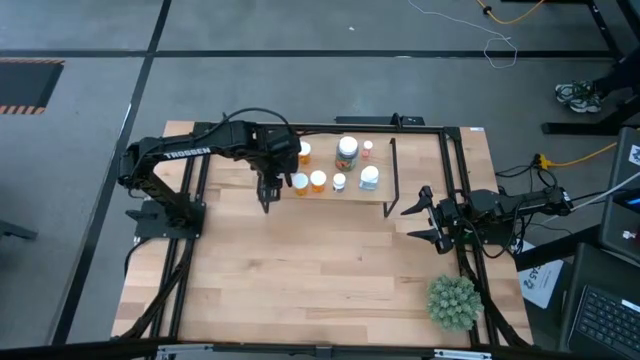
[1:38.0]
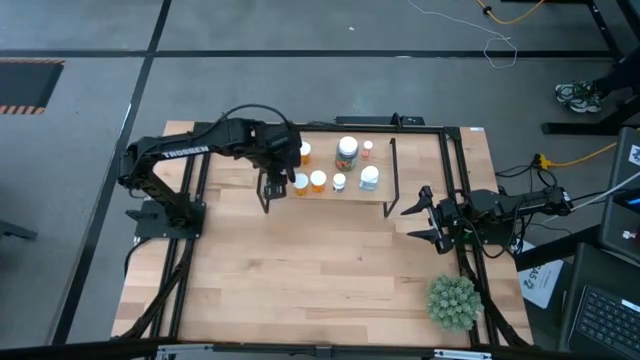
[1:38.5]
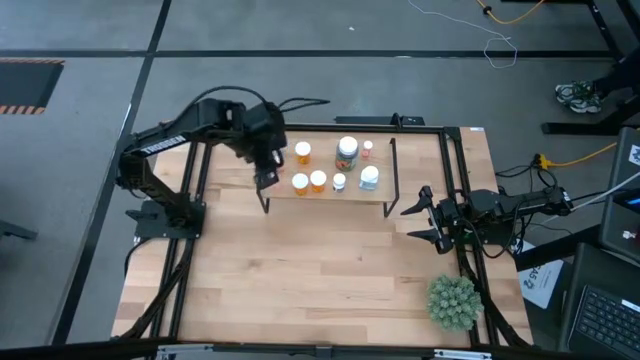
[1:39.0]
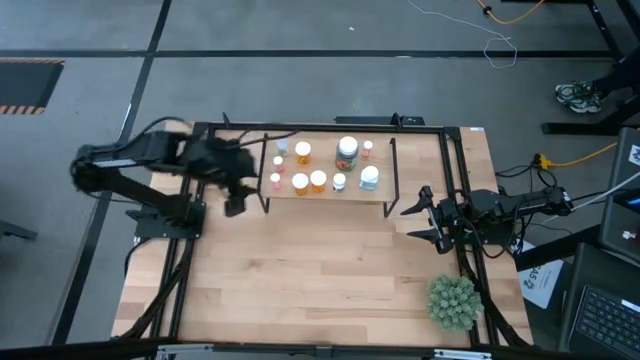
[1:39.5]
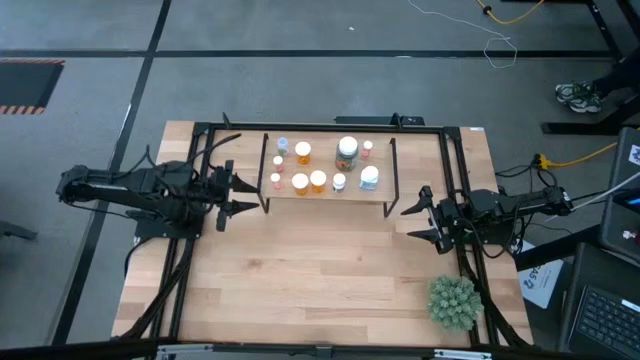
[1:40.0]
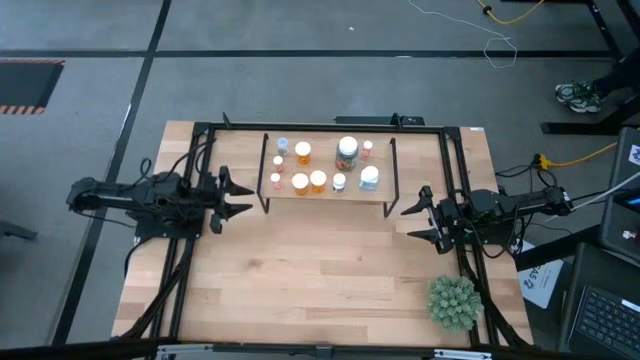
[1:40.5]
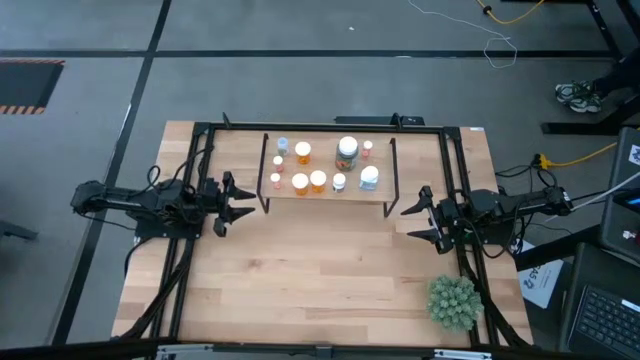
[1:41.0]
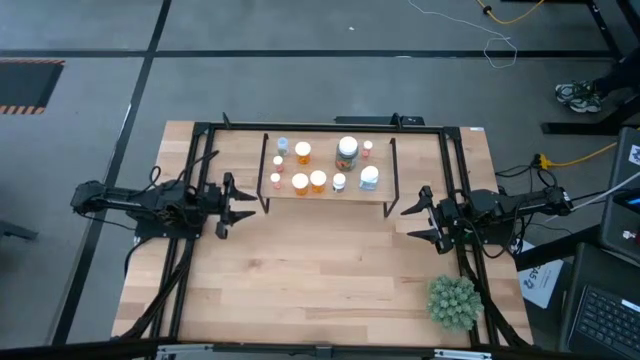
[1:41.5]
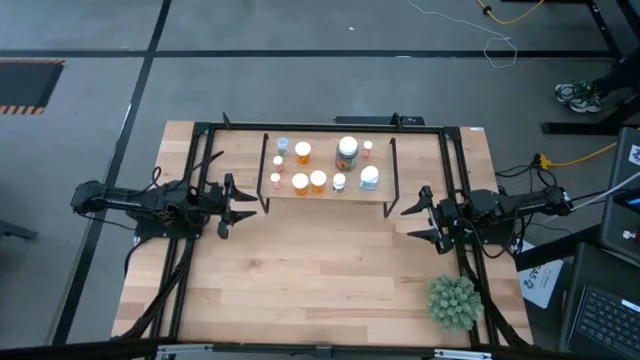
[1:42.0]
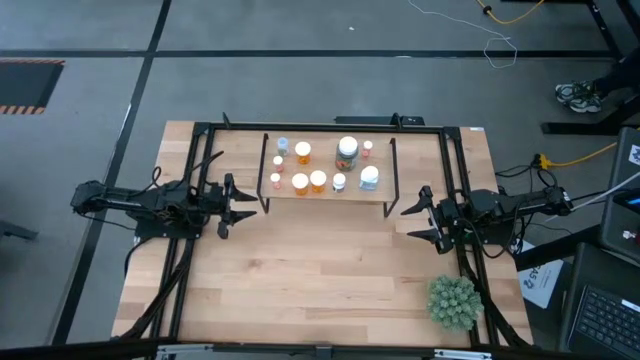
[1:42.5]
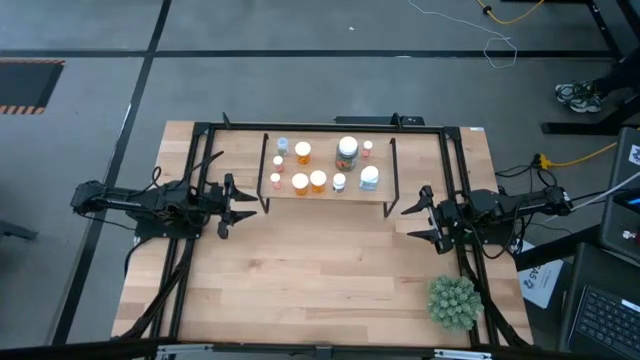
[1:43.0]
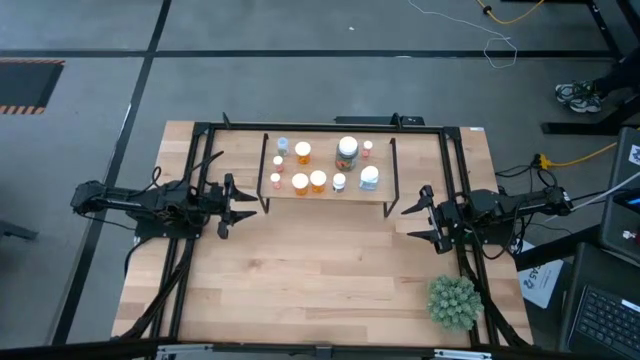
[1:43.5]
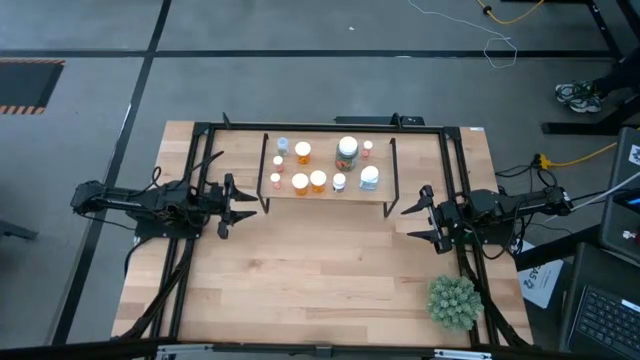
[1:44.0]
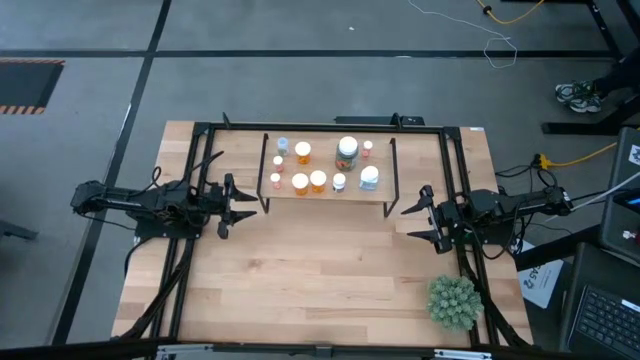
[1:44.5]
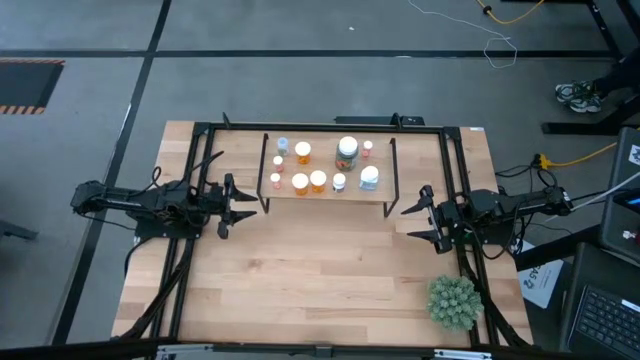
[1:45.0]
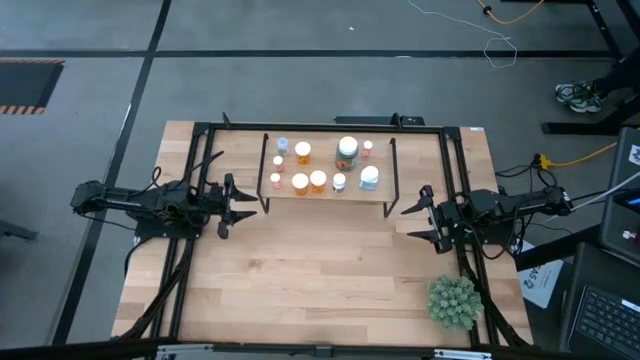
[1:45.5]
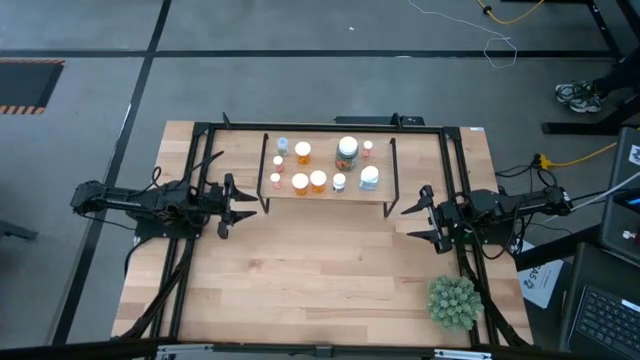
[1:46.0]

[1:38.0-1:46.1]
Task: Pick and place medicine bottles onto shelf by color
Return to Home Position

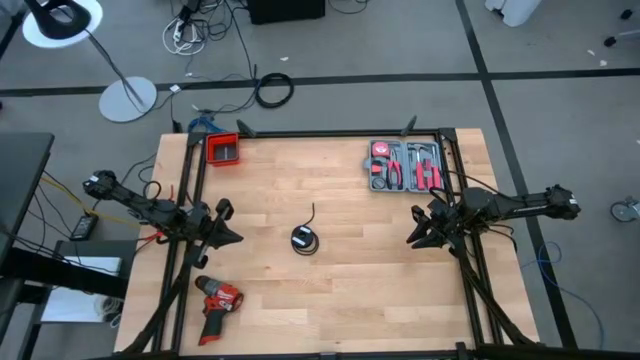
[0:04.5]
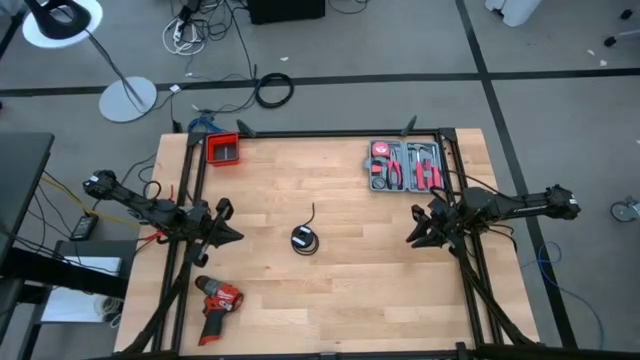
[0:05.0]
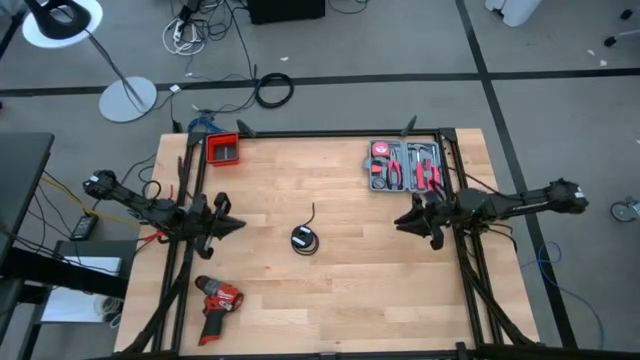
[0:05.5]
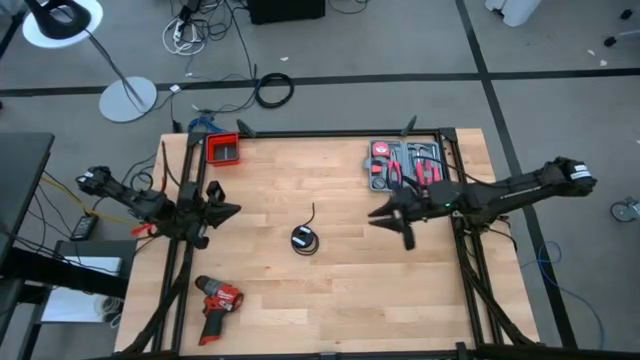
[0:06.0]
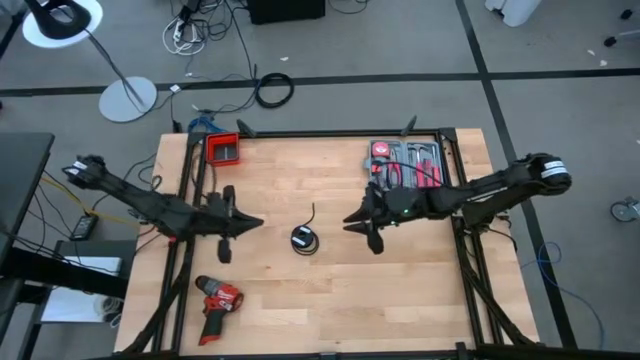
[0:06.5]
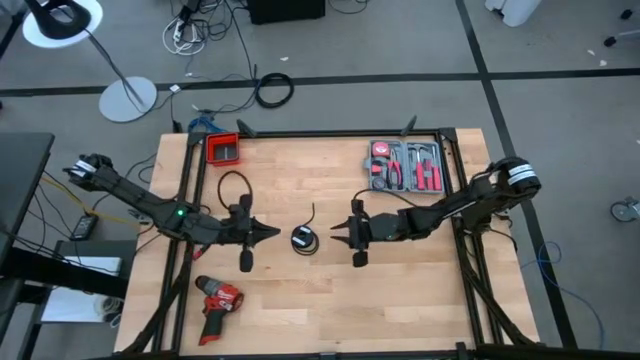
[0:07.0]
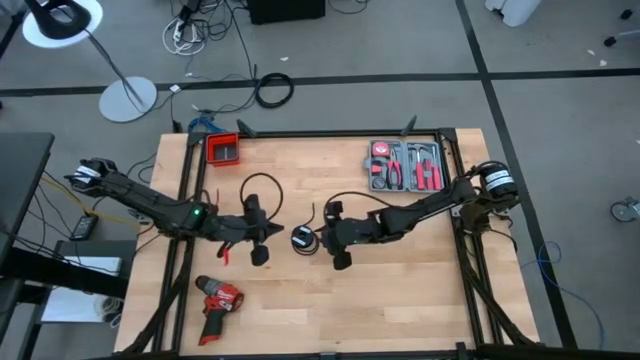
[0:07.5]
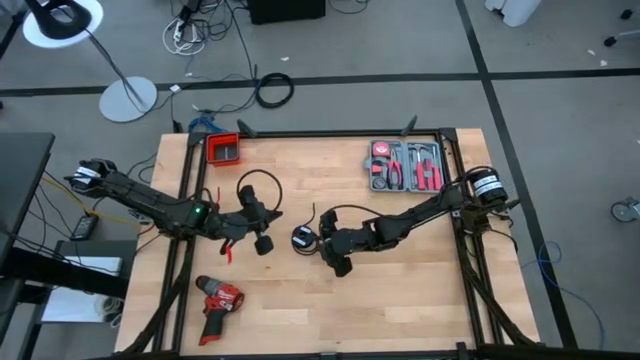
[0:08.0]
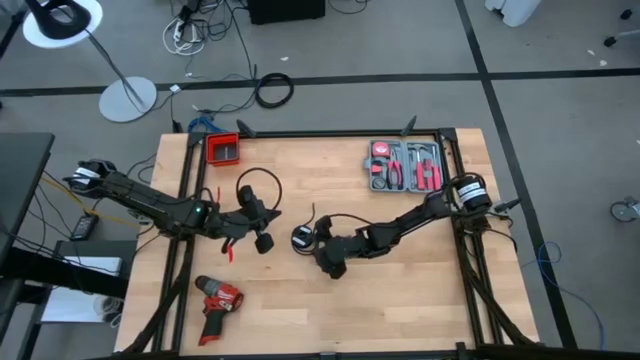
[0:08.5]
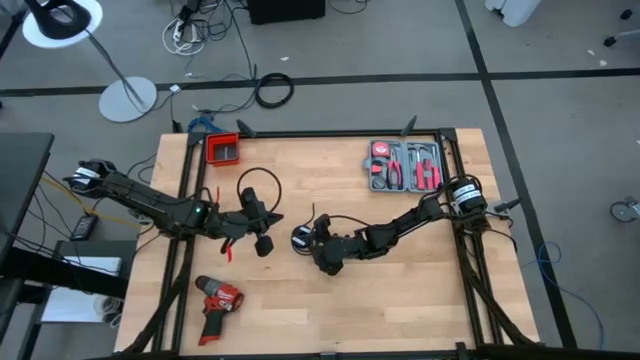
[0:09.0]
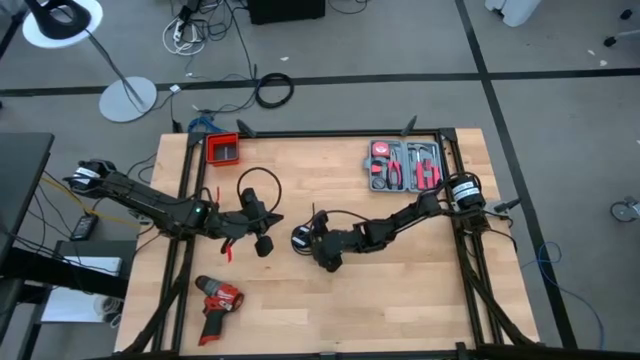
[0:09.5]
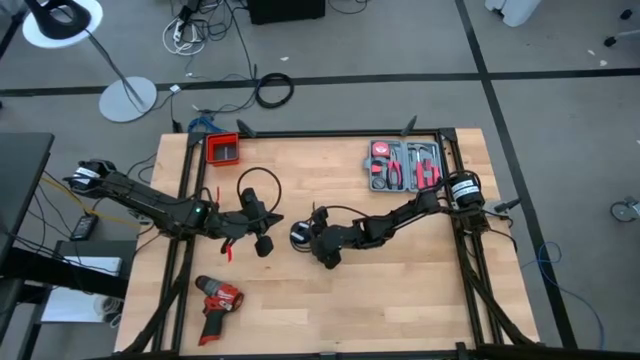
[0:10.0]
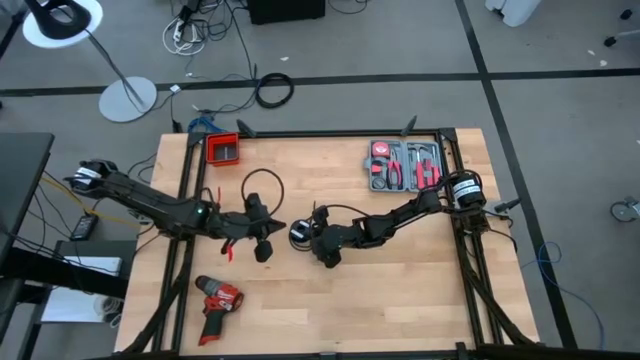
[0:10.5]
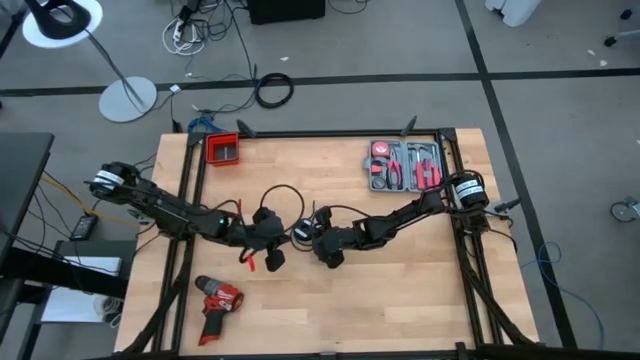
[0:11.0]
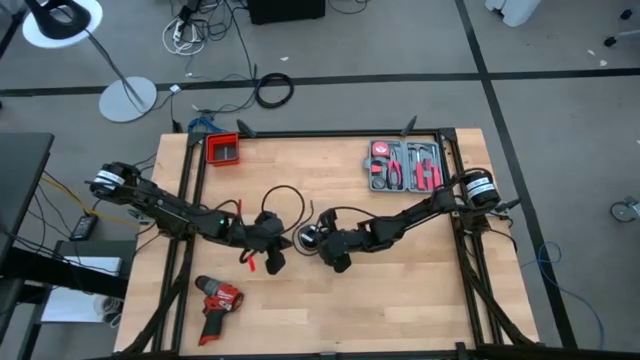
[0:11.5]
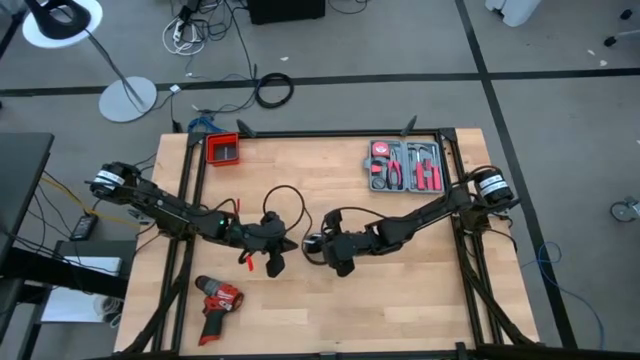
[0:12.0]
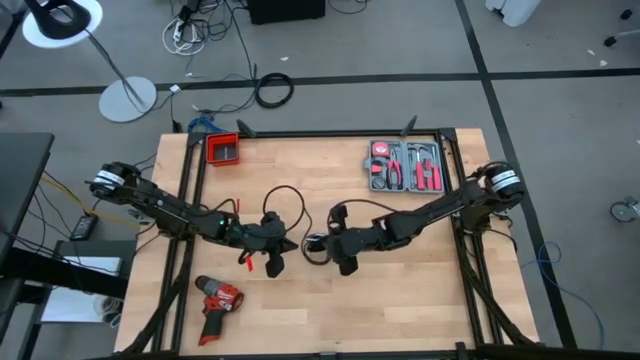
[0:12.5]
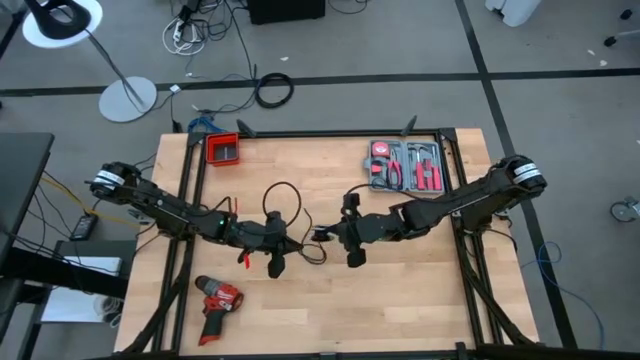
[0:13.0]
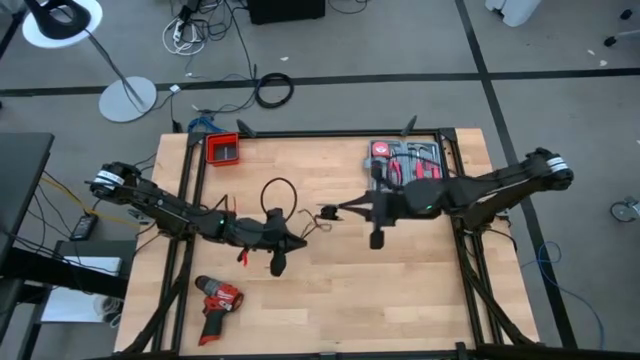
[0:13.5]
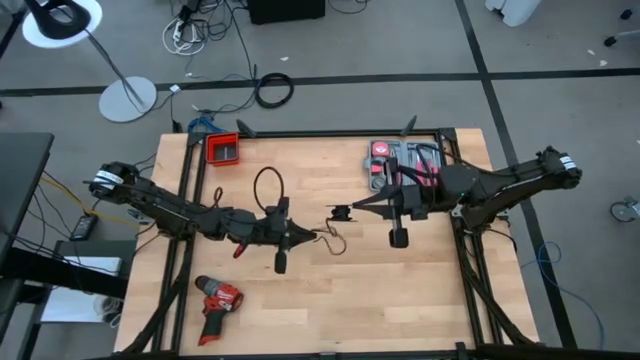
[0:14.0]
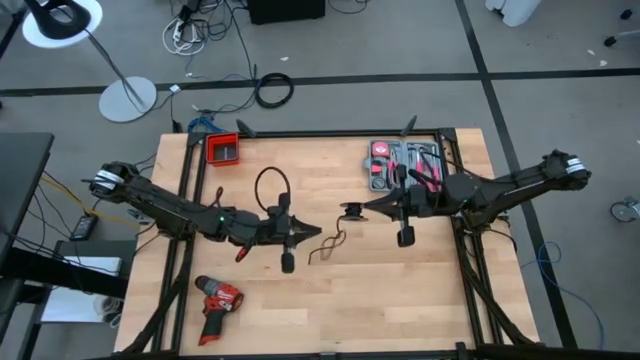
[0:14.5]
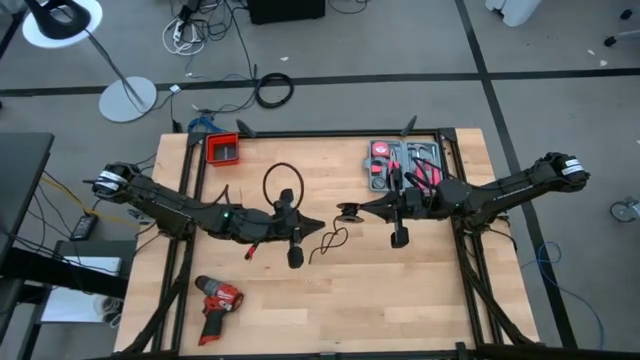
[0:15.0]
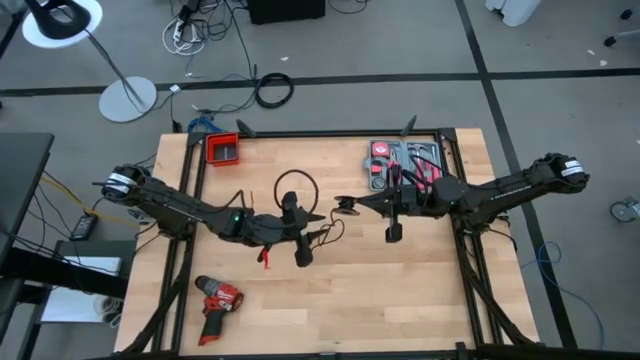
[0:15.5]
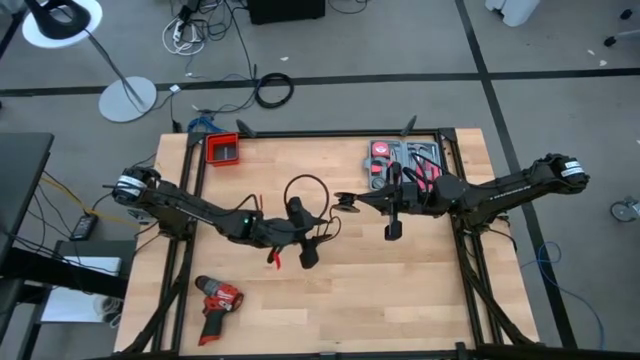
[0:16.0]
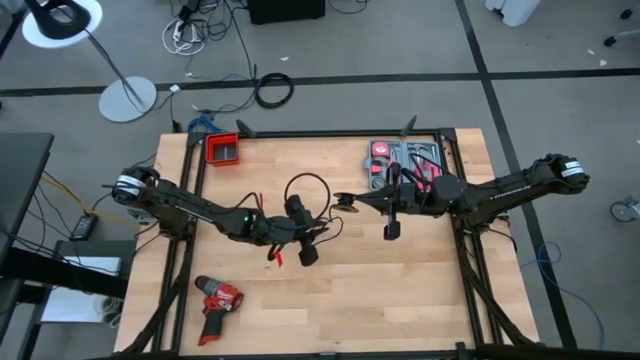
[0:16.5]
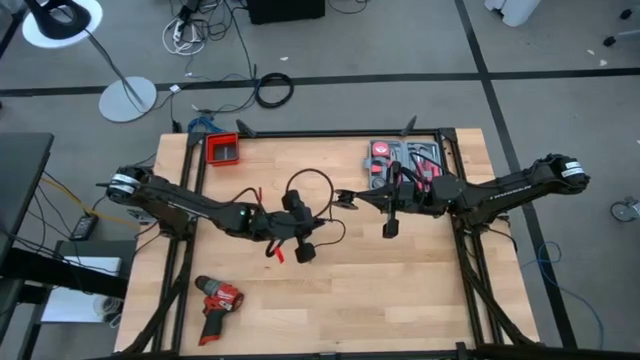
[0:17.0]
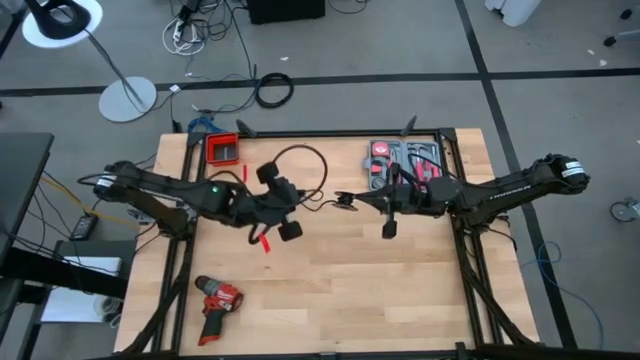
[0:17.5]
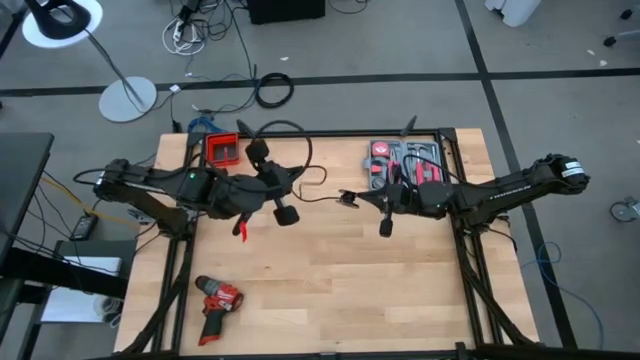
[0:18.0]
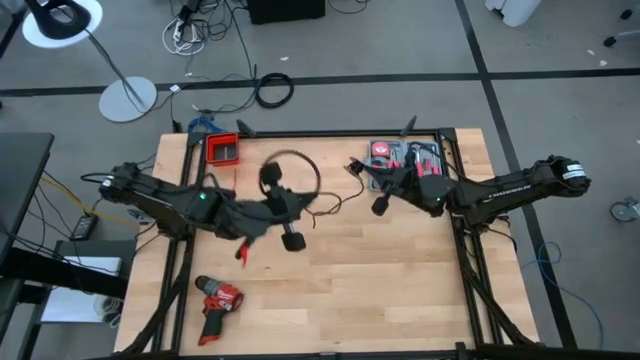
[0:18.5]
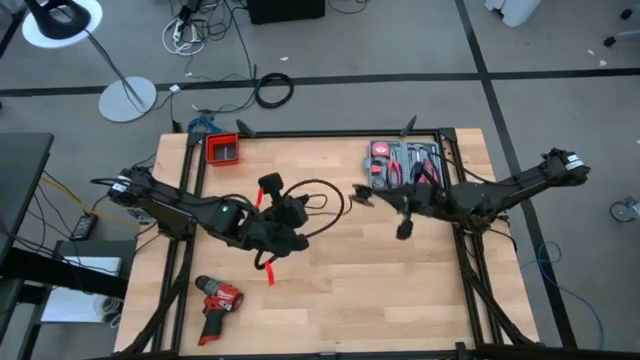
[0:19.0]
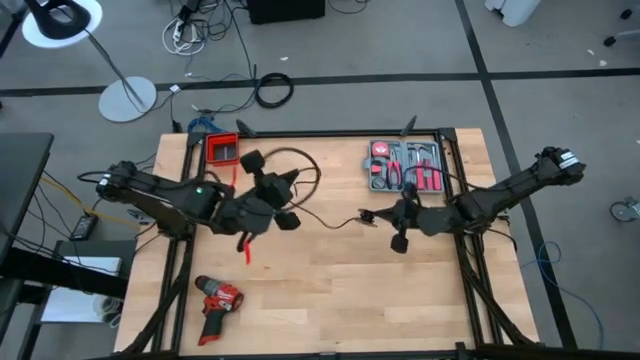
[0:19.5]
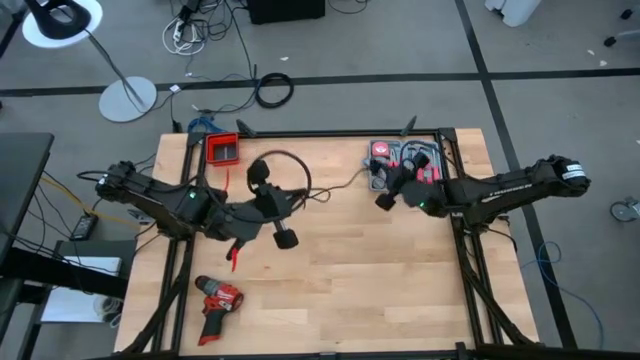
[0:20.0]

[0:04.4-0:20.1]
Task: Coil cords
Uncoil the black wire from the black spool
